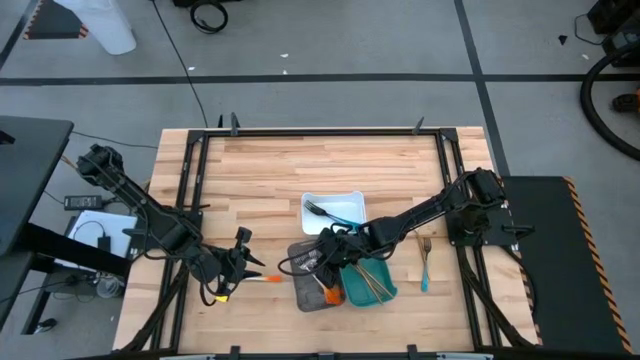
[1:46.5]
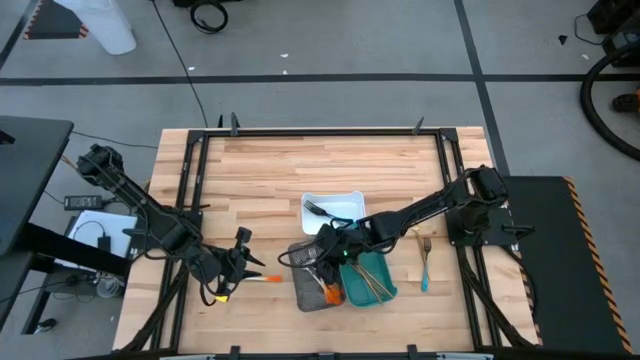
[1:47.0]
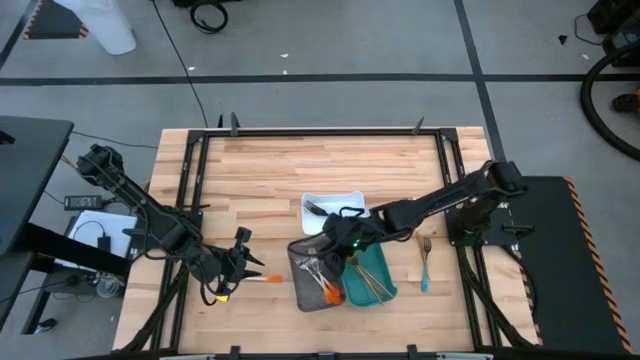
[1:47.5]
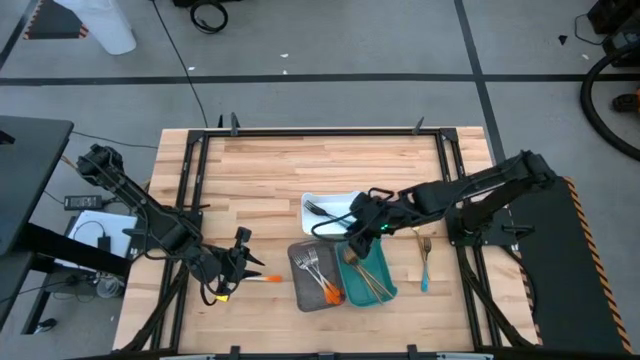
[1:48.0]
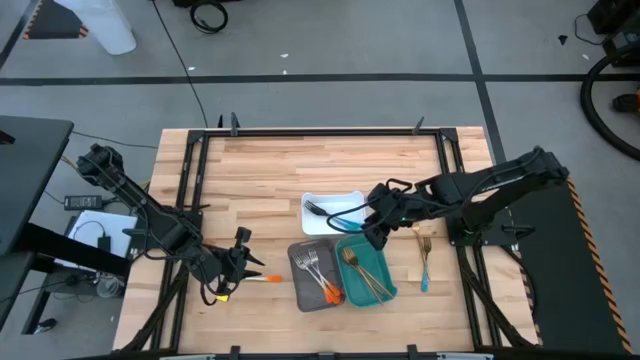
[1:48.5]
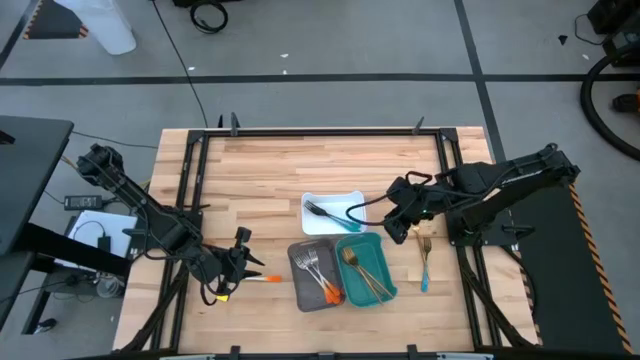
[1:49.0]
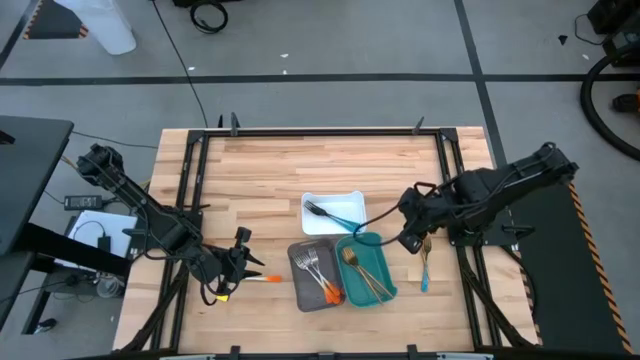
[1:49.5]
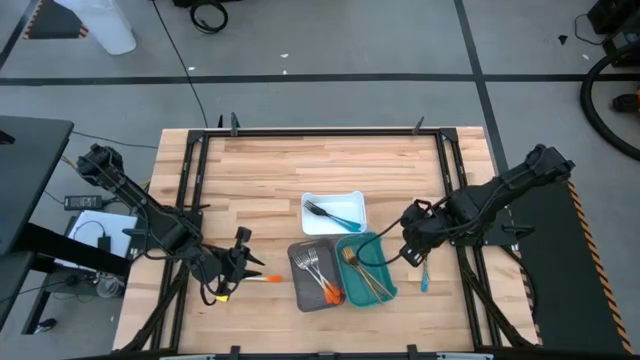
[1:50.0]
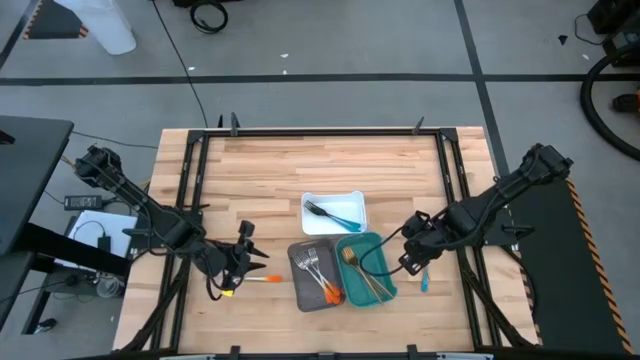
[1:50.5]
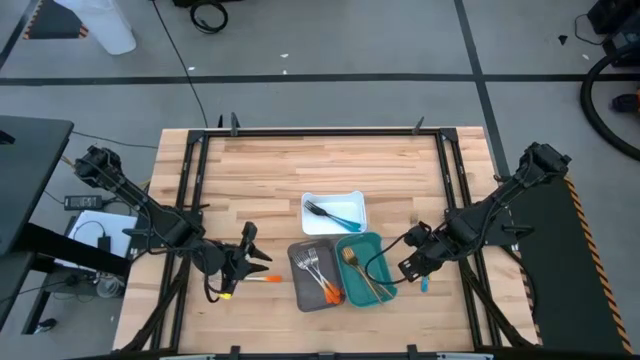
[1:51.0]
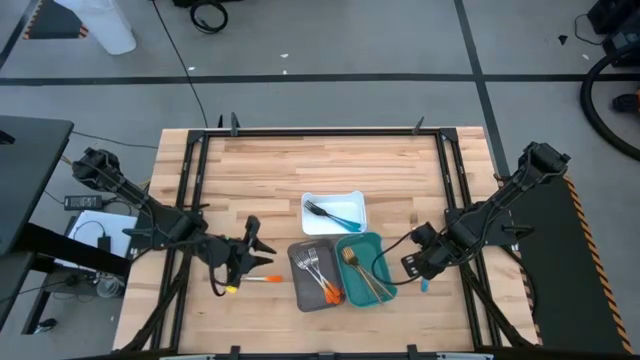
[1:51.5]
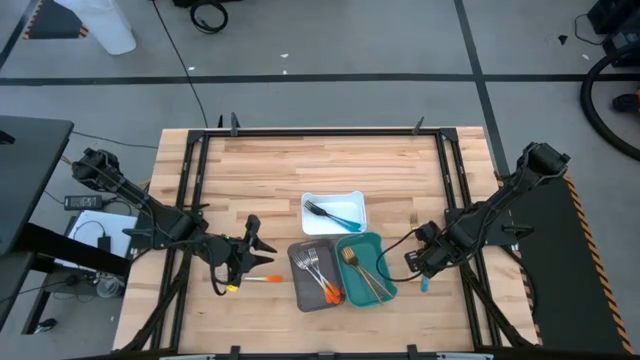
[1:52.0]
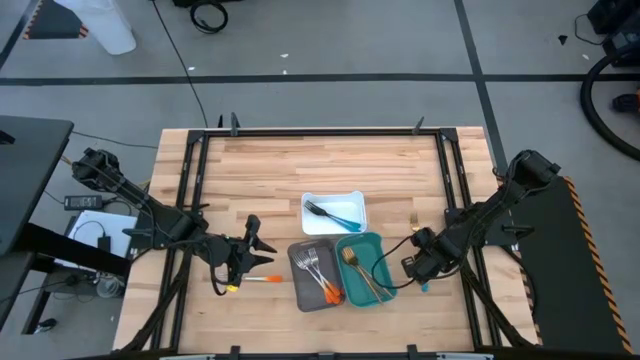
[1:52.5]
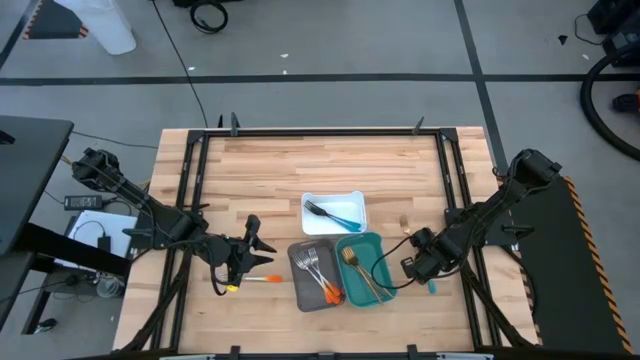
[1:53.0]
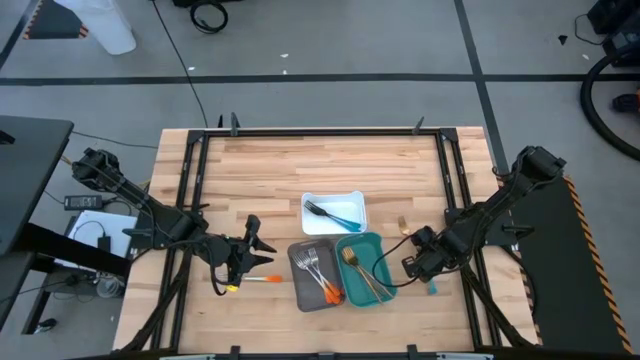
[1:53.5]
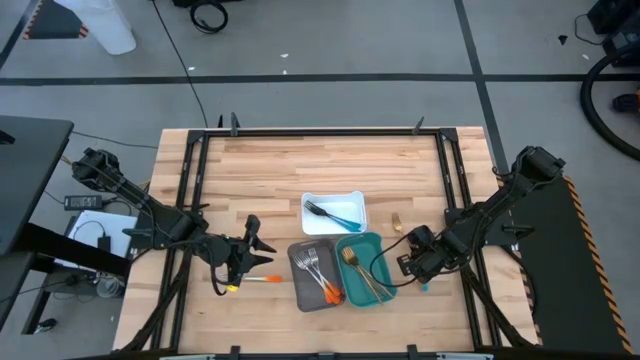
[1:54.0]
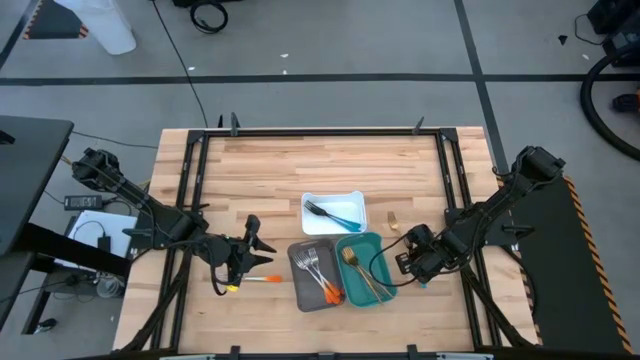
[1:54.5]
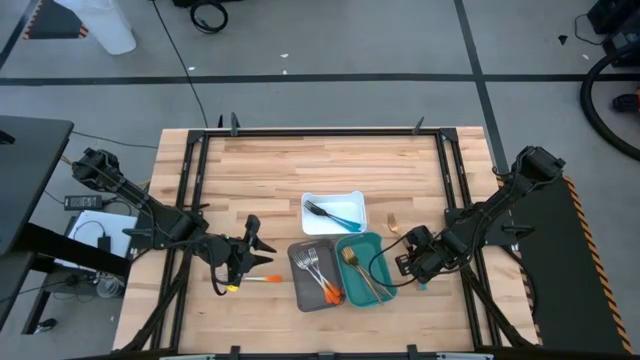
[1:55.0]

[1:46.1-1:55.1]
Task: Sort silverware by color (type)
Put the blue fork into the white bin

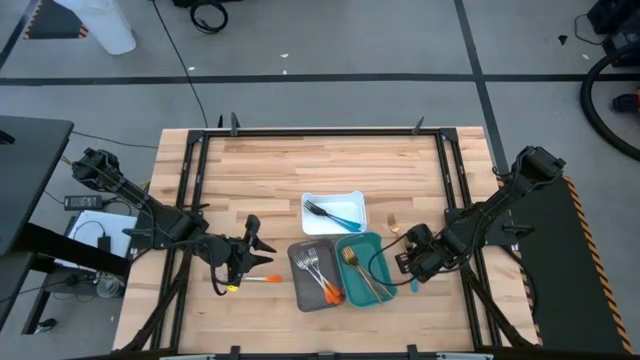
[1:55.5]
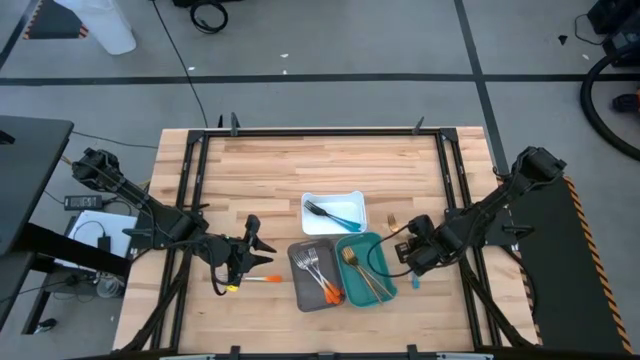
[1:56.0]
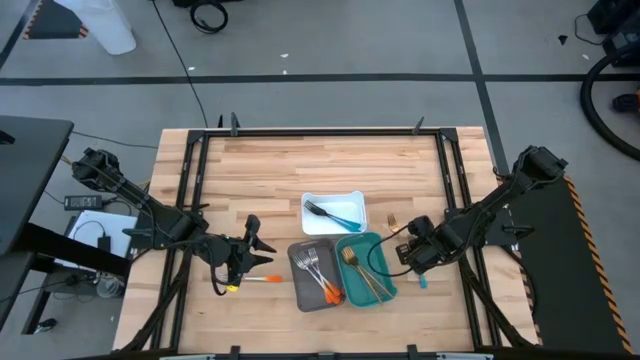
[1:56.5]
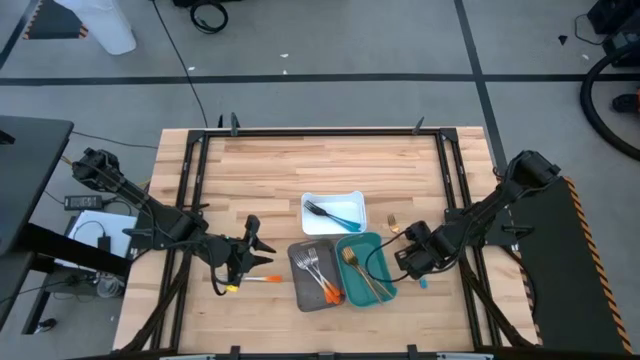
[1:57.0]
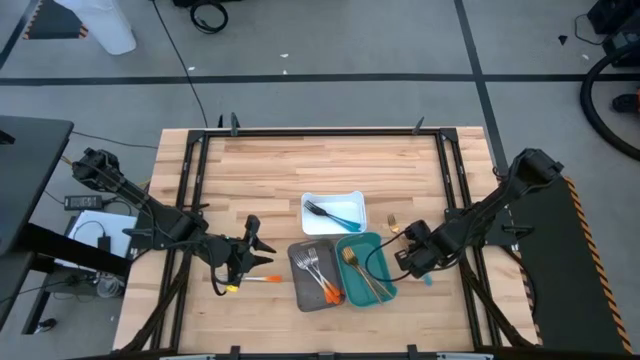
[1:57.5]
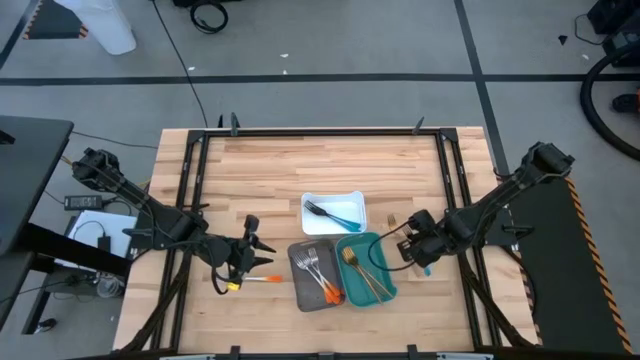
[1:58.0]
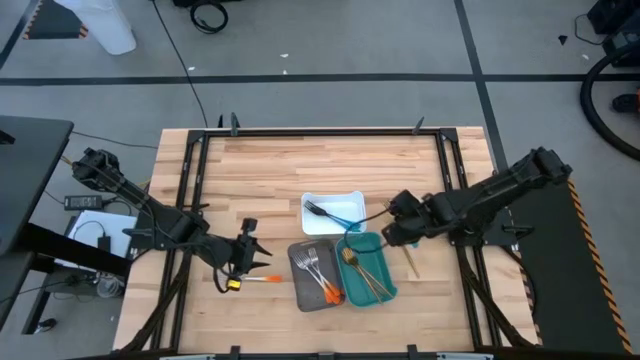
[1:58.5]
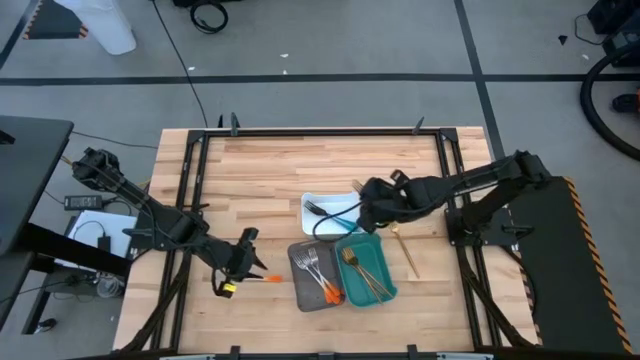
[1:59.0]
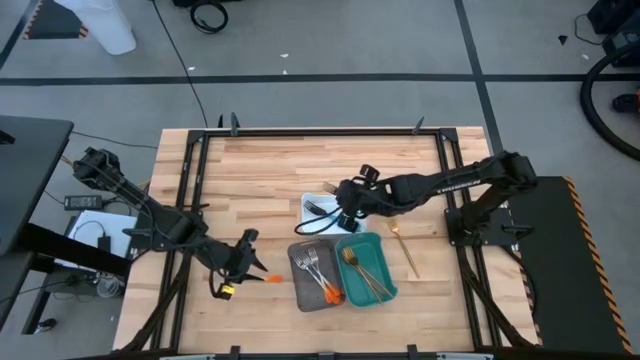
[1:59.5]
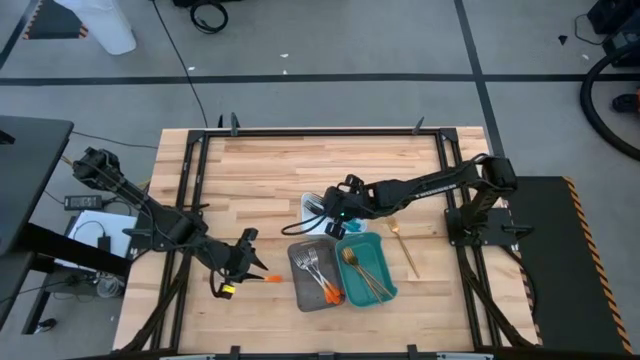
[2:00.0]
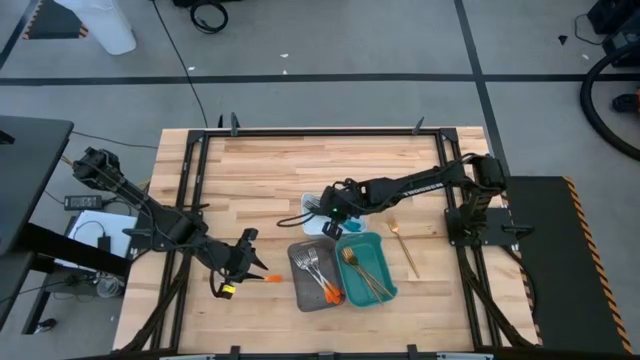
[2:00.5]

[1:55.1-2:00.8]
Put the blue fork into the white bin

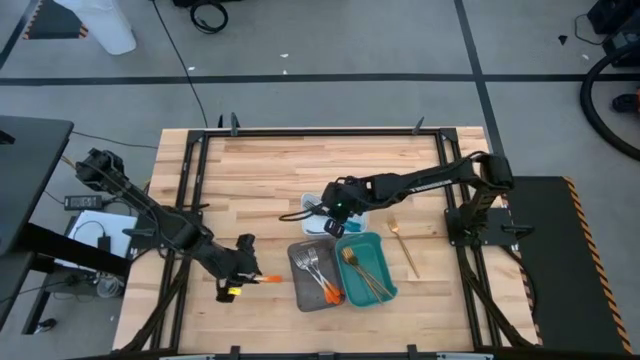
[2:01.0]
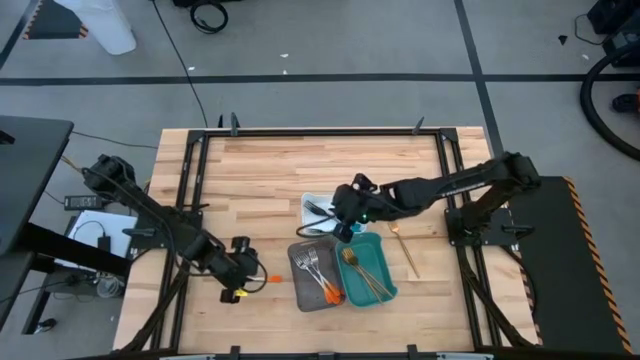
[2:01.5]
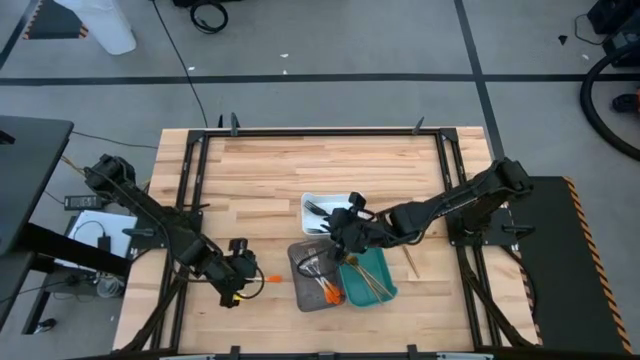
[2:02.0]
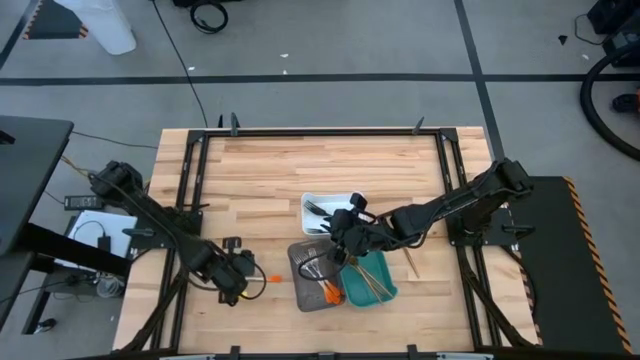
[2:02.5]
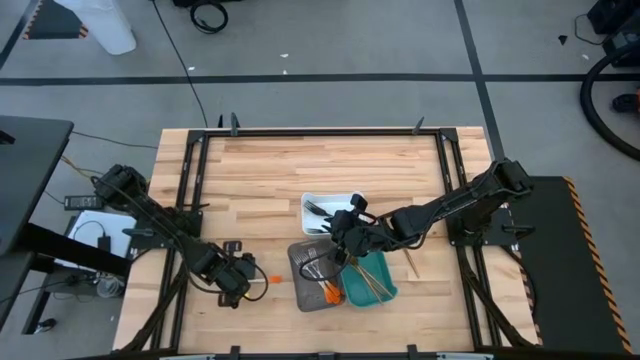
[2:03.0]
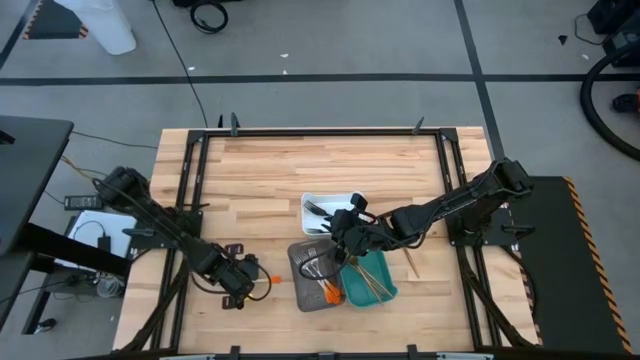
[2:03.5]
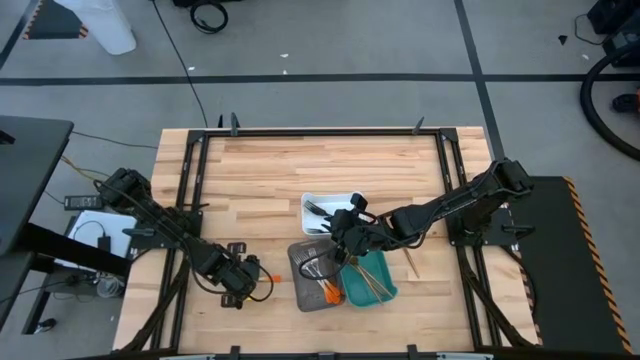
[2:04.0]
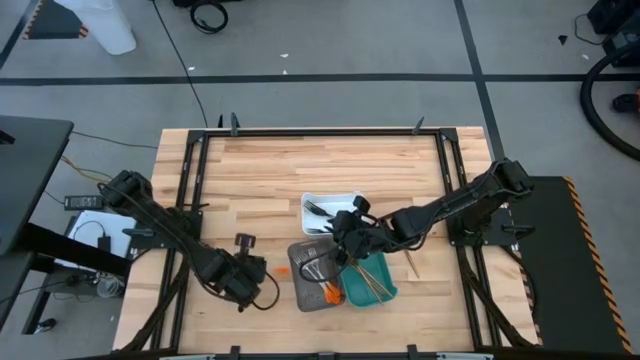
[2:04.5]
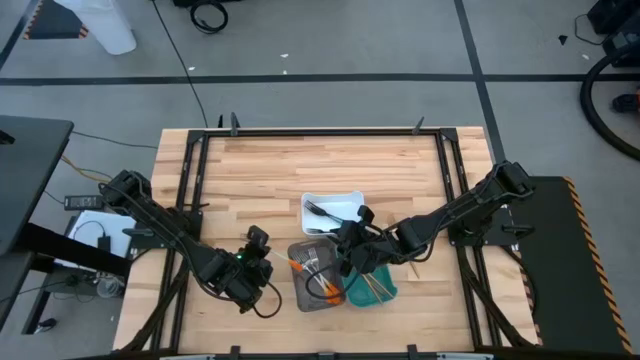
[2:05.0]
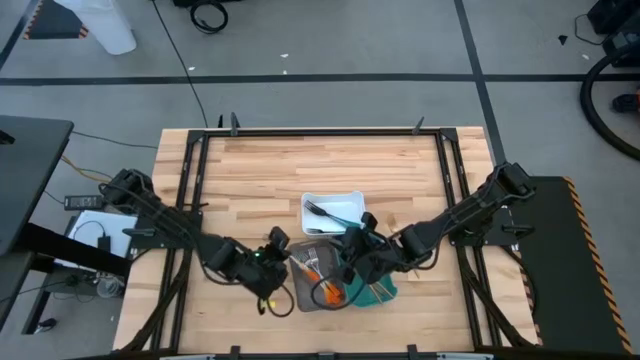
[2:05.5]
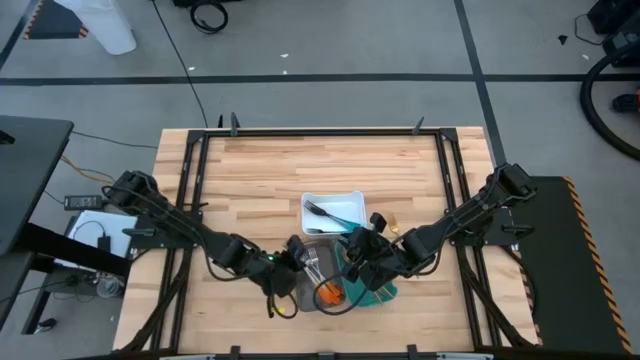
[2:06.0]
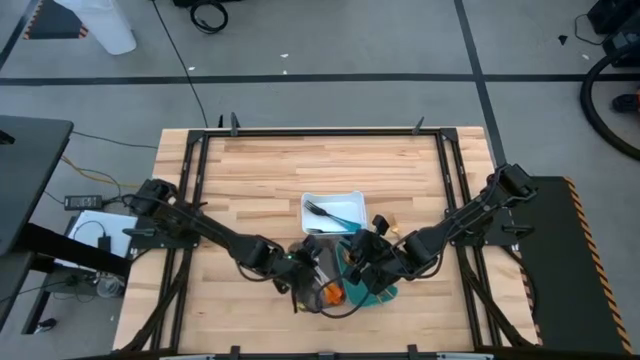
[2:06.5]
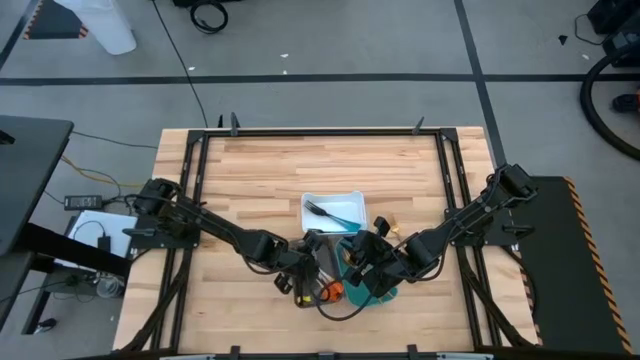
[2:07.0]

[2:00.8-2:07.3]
Put the orange fork into the black bin
